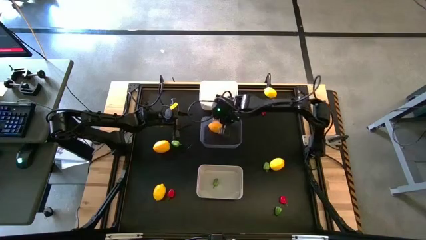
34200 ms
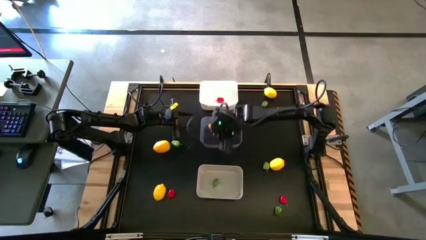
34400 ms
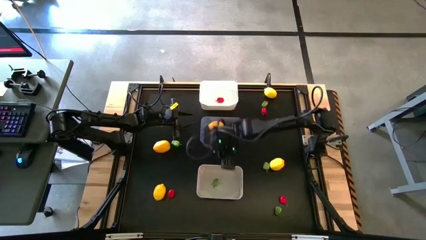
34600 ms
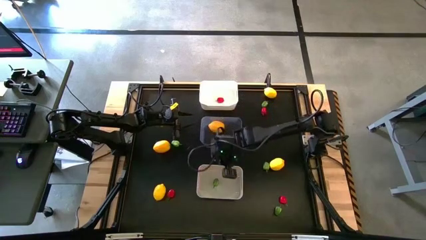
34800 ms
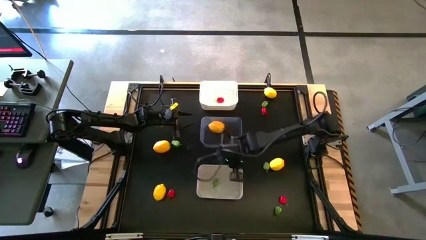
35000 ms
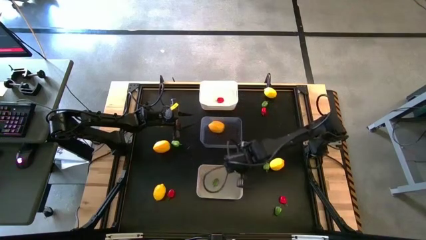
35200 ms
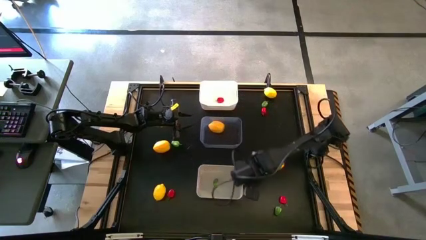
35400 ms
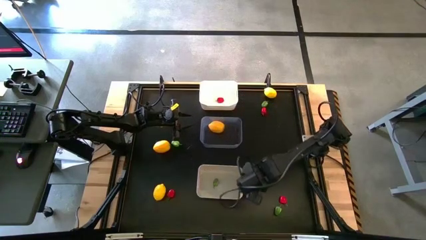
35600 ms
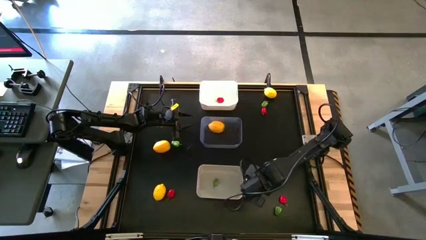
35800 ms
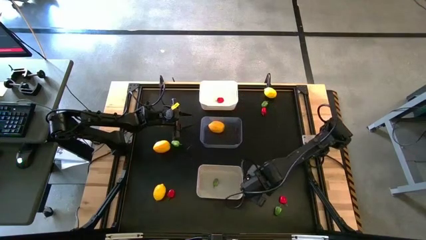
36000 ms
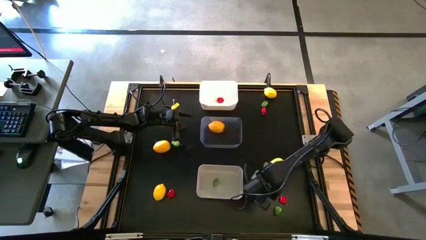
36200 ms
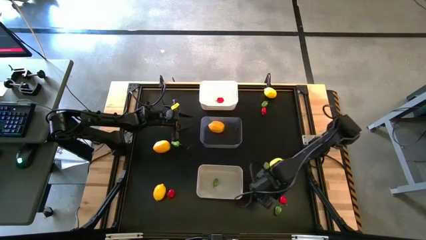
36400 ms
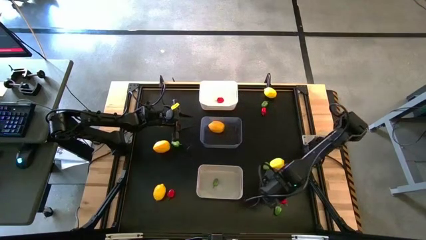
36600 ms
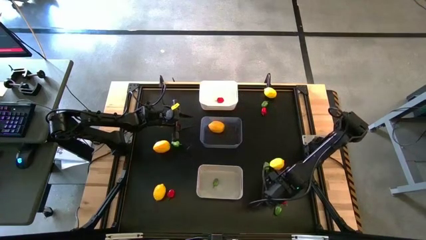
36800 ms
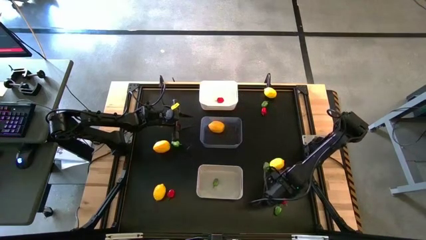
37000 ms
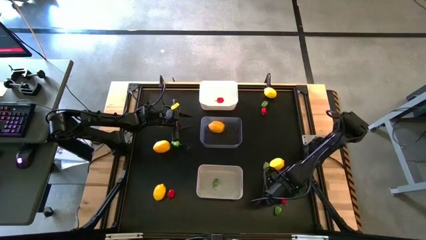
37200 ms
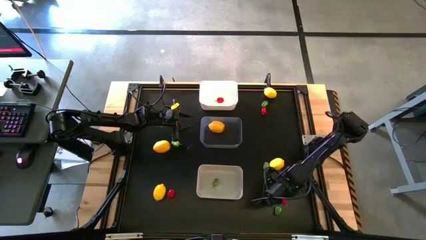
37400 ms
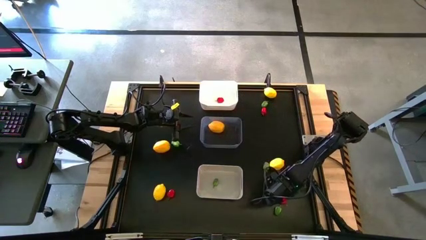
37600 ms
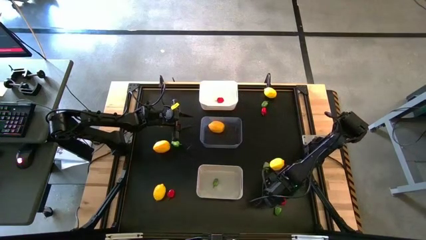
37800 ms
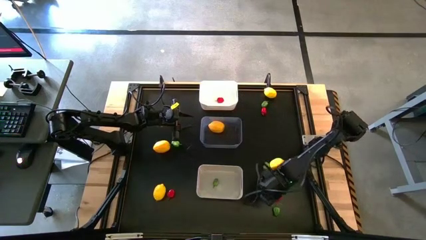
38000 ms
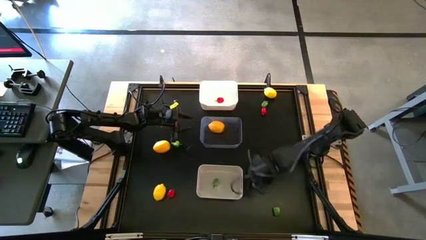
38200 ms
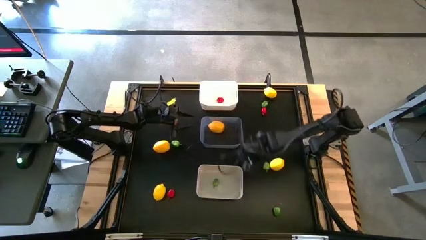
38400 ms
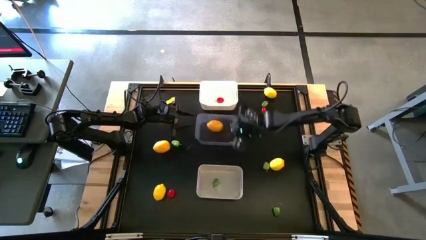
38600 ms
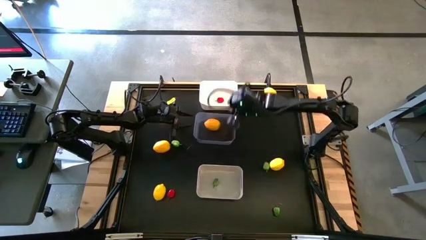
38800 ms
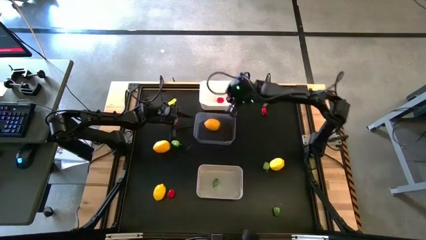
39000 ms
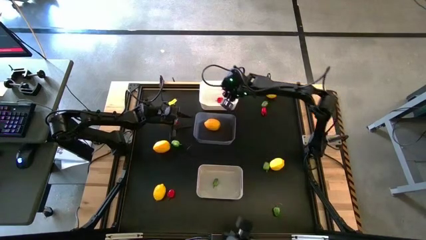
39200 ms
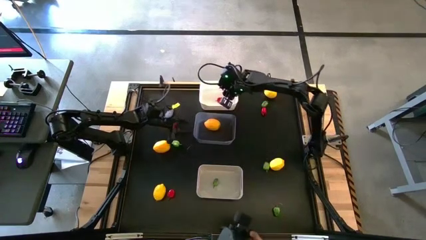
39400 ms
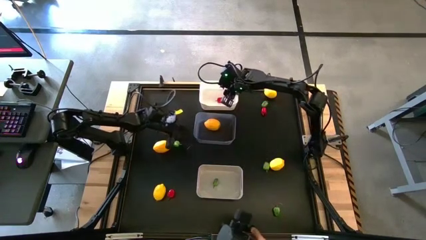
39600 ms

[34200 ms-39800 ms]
Task: Sort produce into baskets
Put the red chili pepper into the white bin

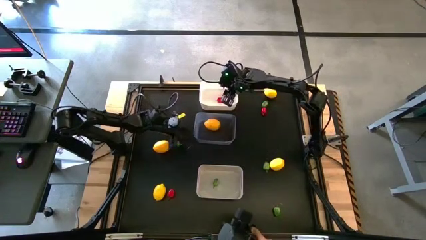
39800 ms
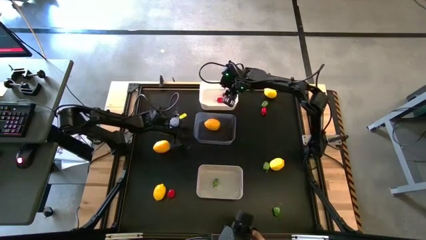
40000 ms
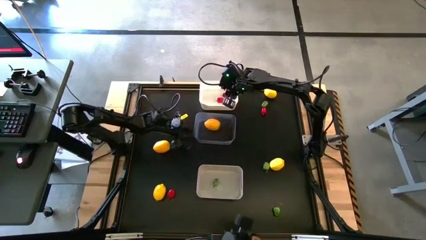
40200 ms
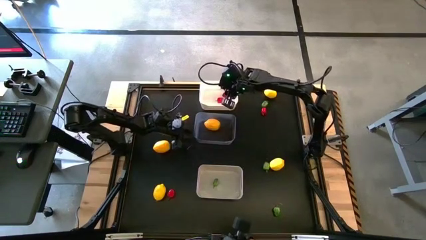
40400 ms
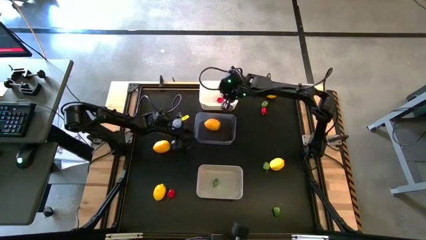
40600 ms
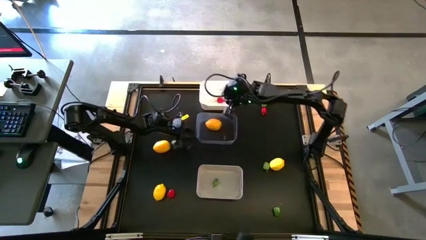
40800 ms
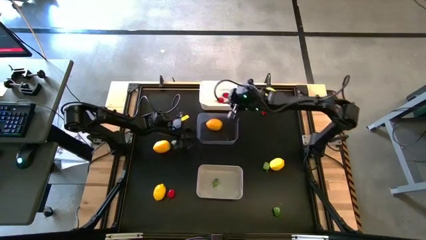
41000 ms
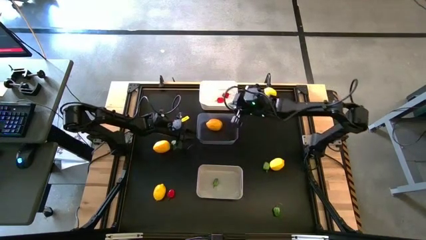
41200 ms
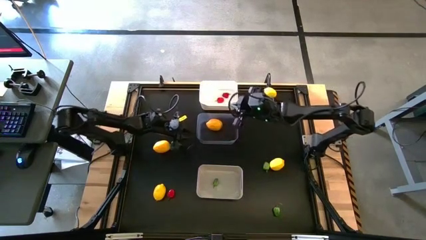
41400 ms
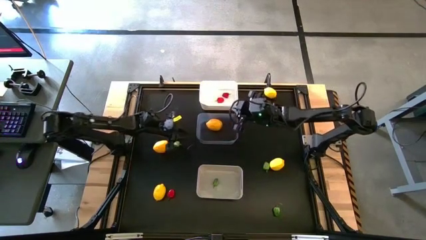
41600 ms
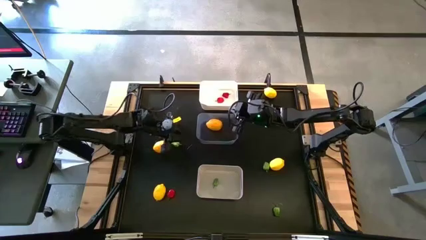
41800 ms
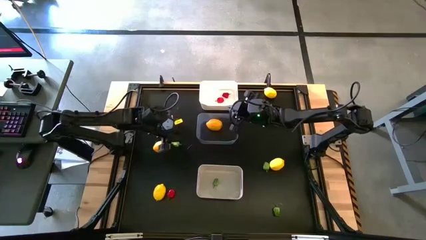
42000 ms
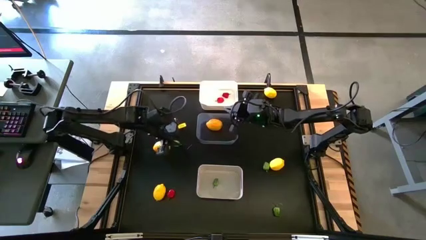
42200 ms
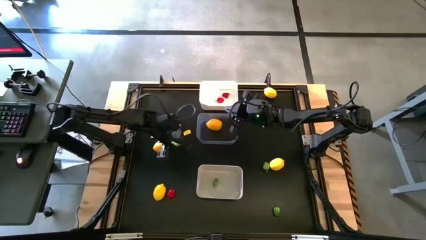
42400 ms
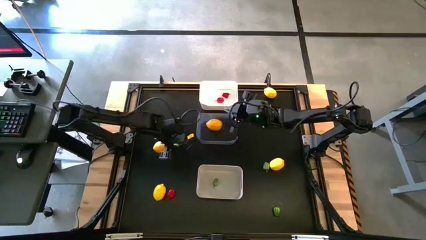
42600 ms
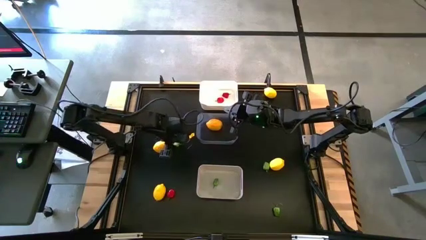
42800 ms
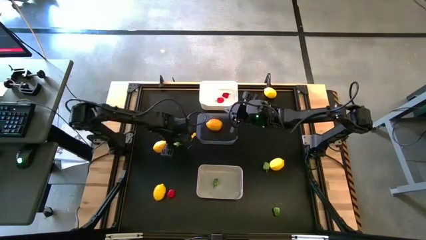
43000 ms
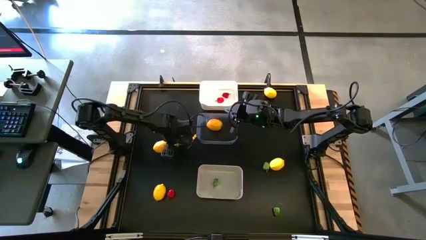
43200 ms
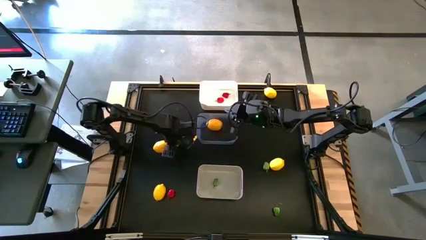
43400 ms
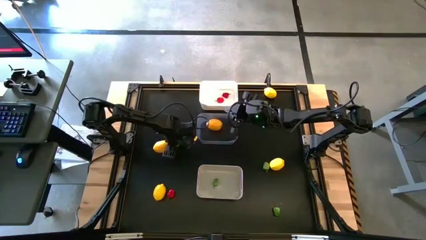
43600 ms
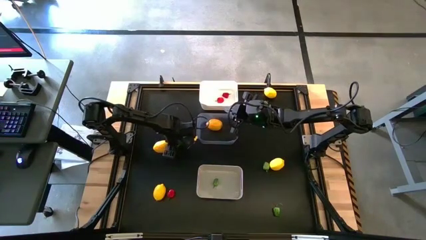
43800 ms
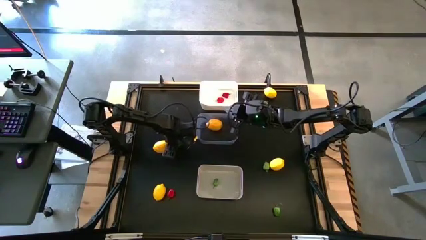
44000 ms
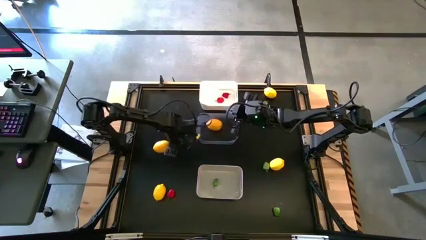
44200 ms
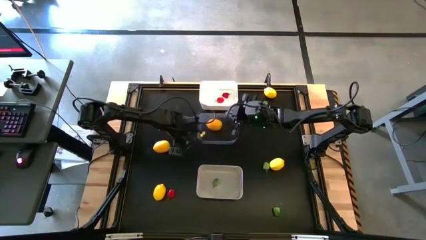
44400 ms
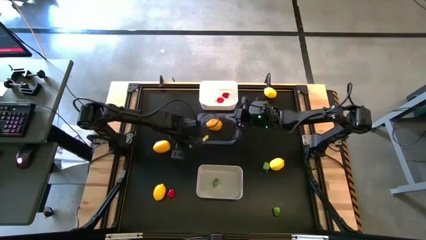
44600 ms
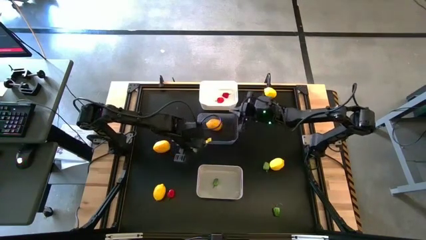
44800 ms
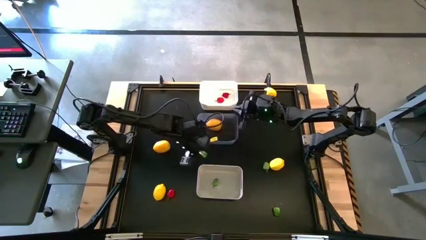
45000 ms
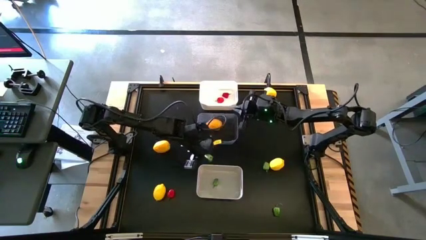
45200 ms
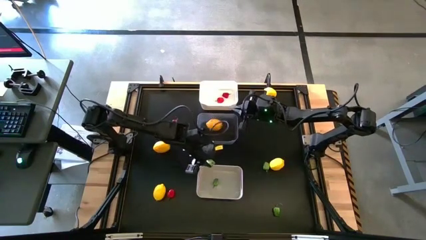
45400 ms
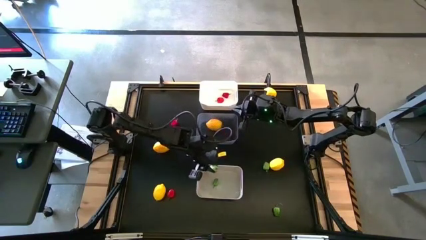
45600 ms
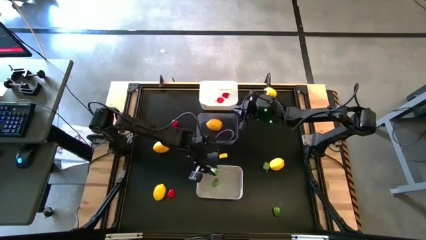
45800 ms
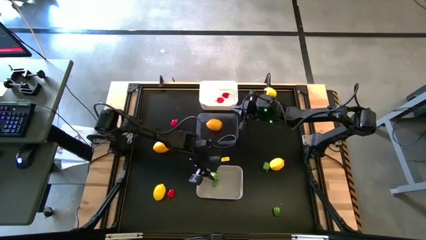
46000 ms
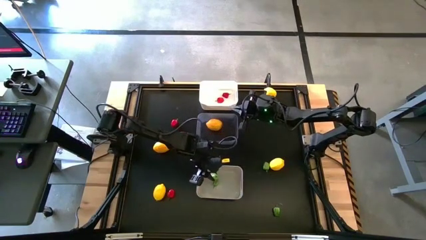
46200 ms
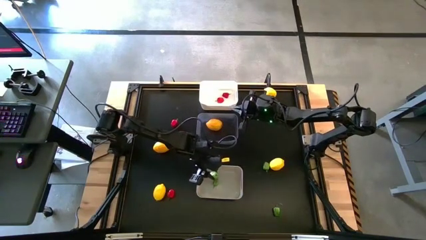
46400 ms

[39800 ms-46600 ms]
Put the green chili pepper into the gray bin

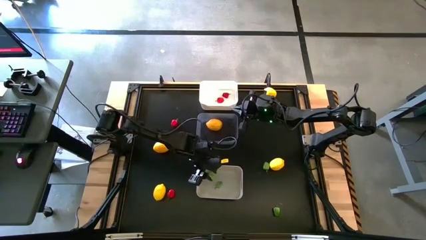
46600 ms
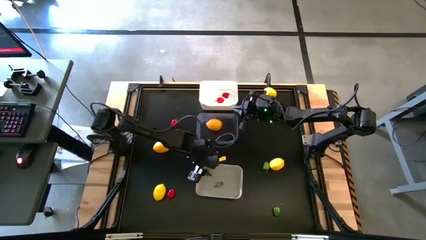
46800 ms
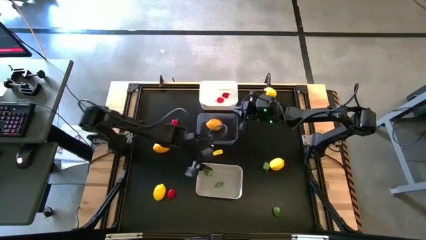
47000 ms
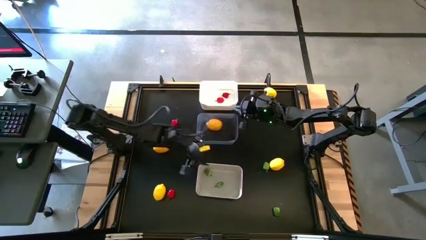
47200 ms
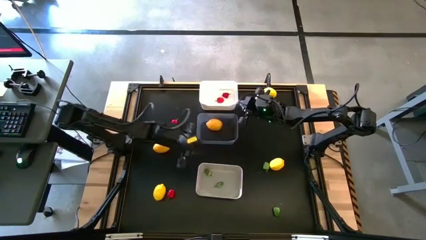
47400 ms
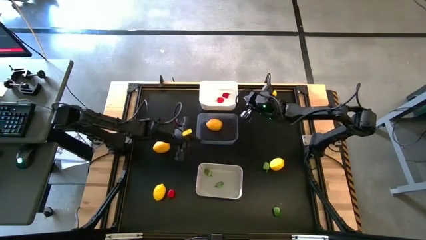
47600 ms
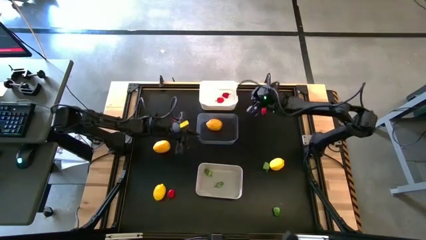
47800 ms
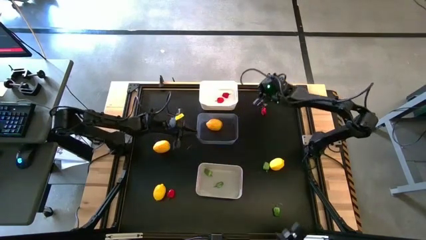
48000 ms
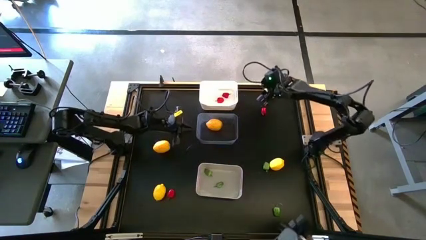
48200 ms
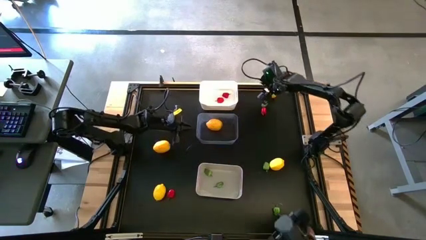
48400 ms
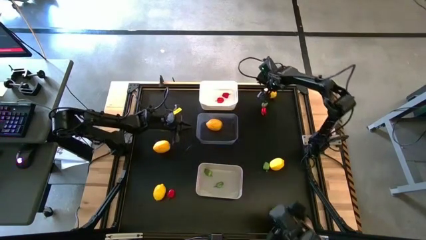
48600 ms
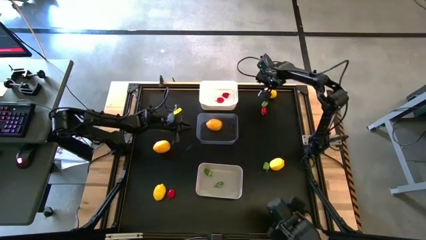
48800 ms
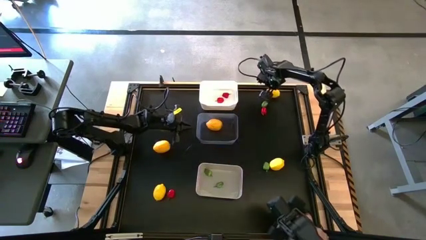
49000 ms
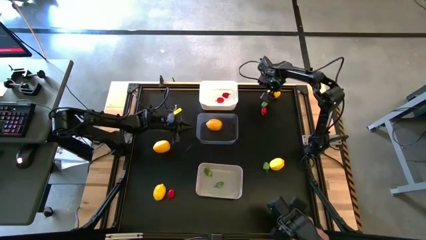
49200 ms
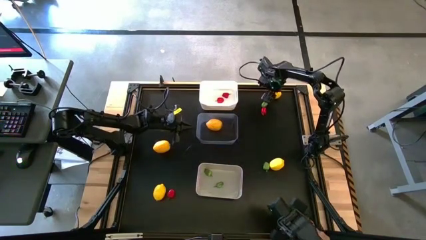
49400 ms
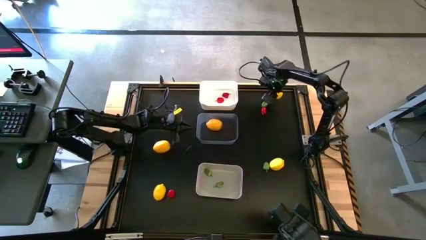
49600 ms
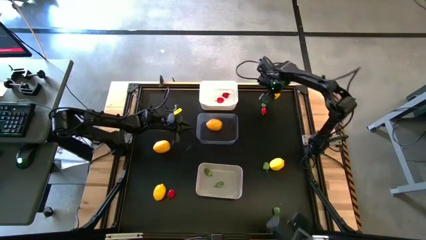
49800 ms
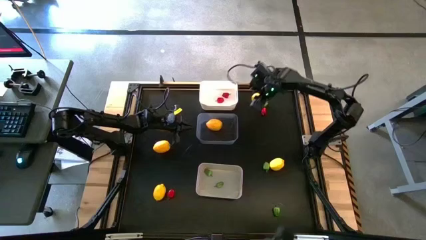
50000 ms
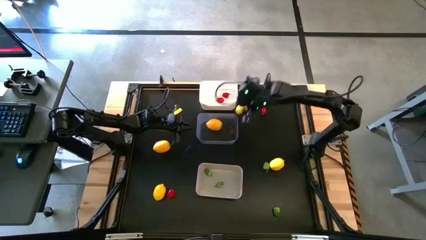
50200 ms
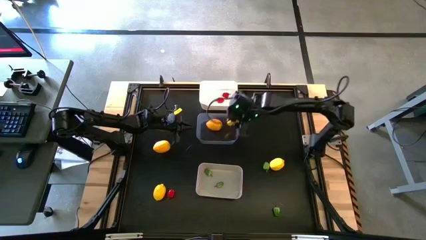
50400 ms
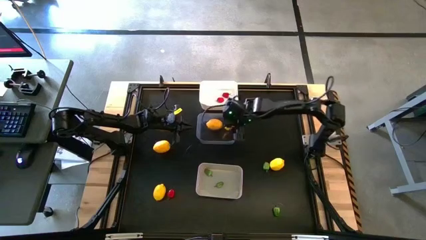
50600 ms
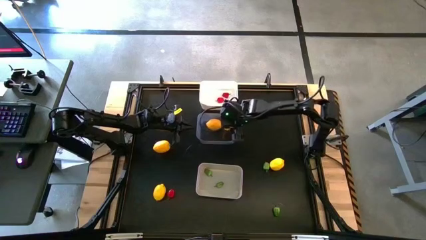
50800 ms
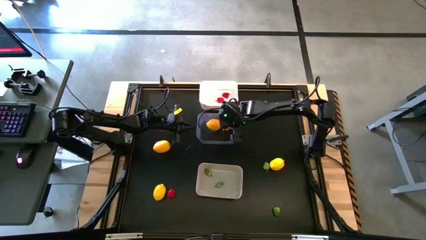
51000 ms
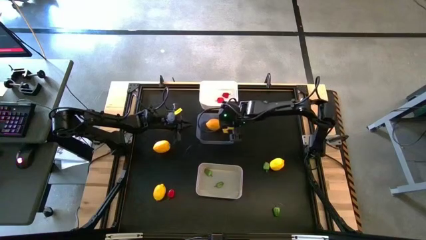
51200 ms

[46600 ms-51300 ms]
Put the yellow lemon into the transparent bin
